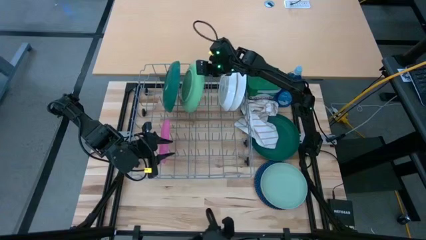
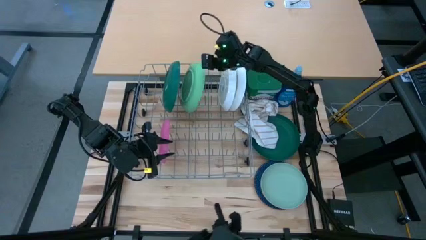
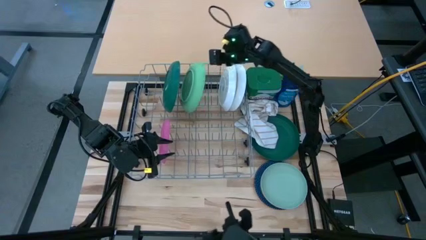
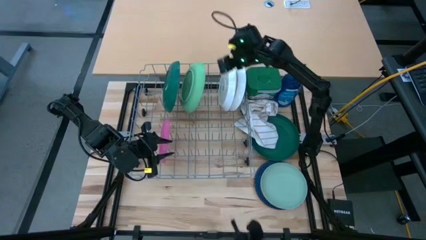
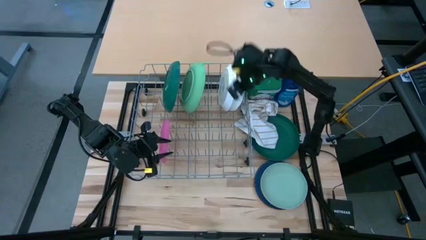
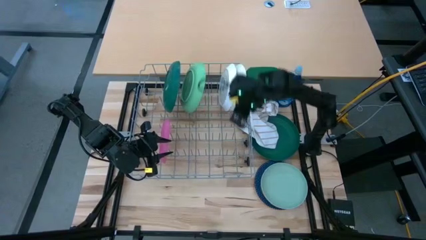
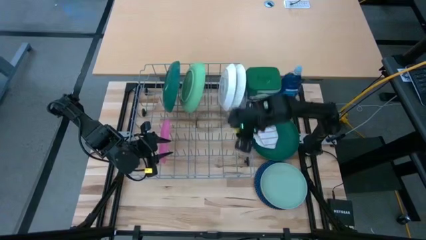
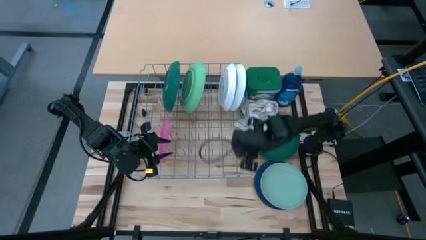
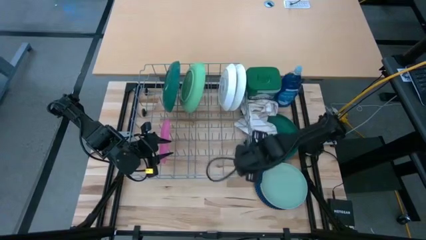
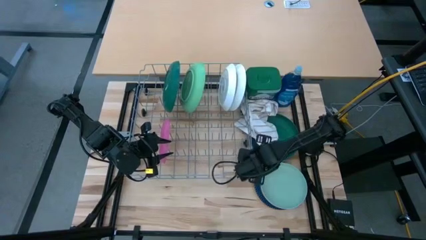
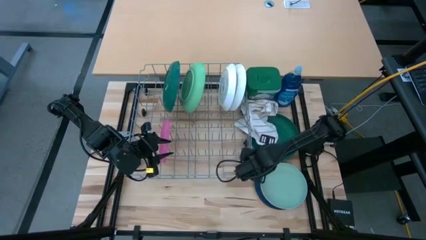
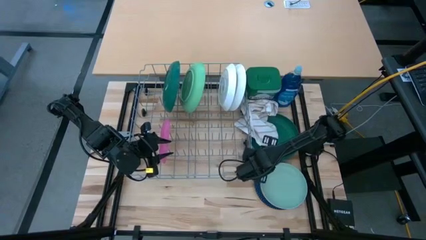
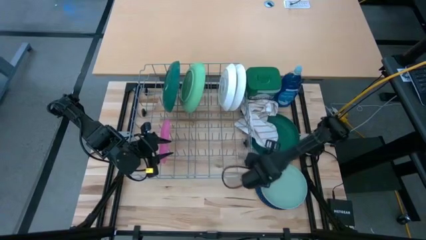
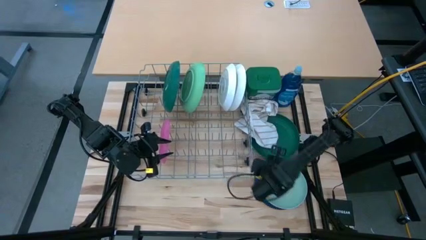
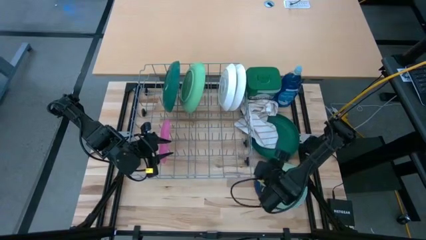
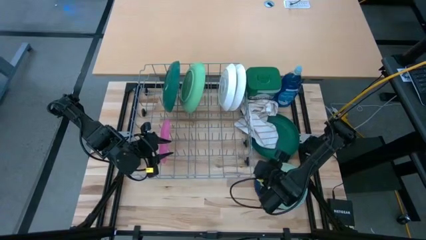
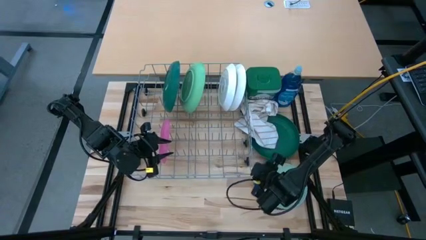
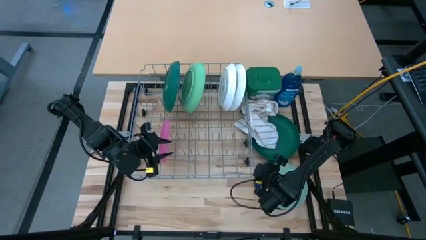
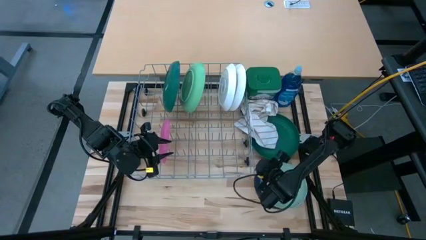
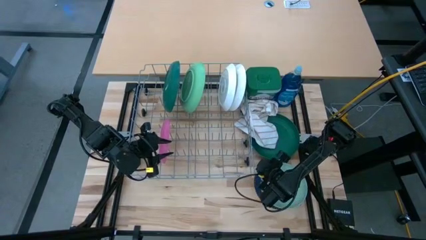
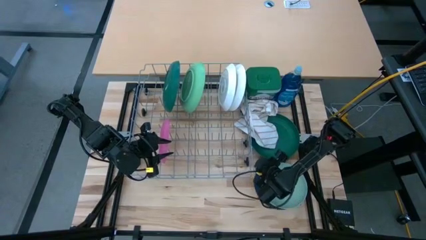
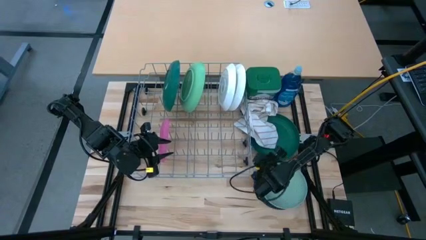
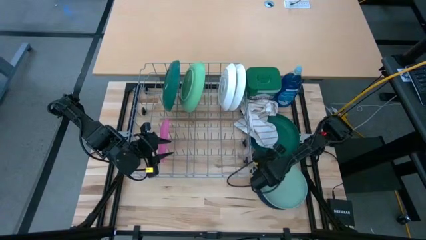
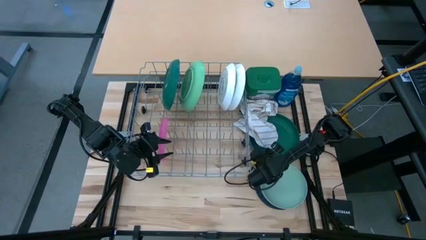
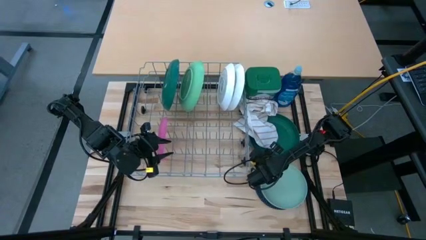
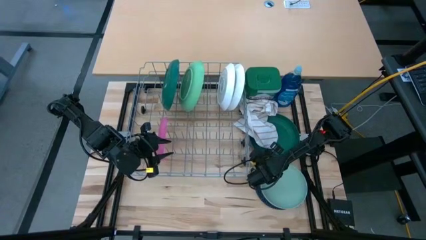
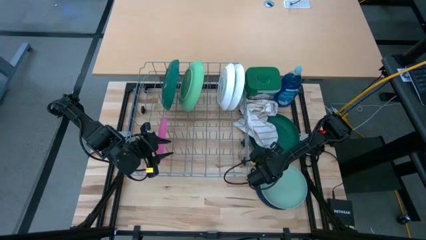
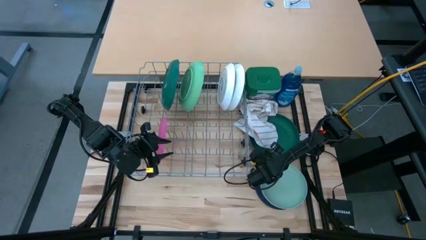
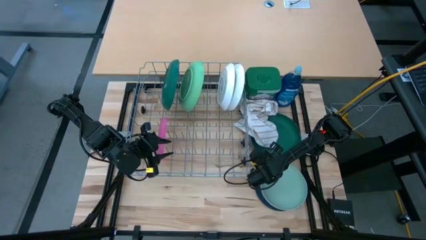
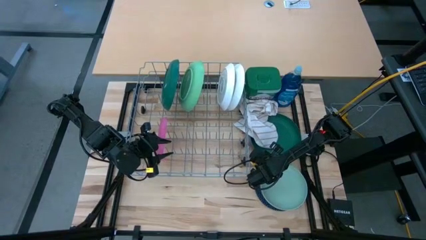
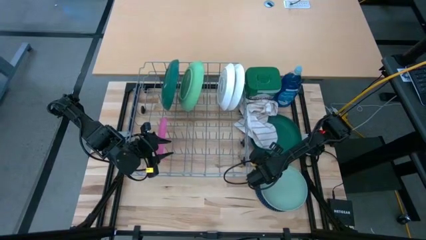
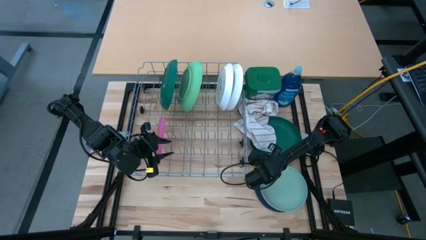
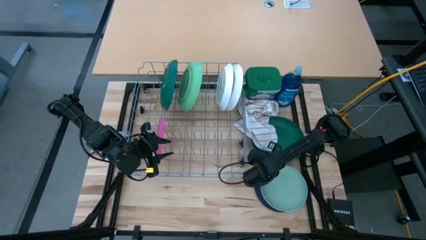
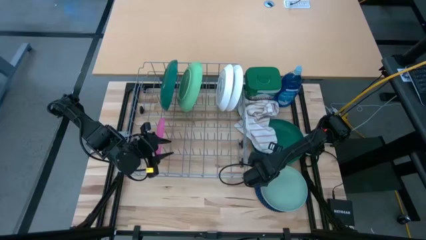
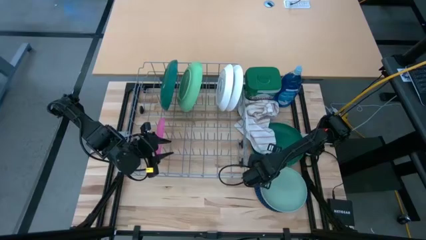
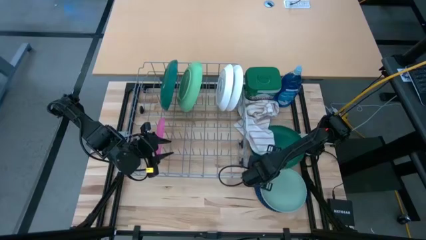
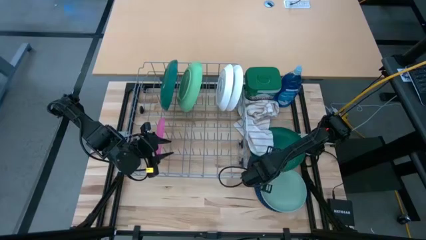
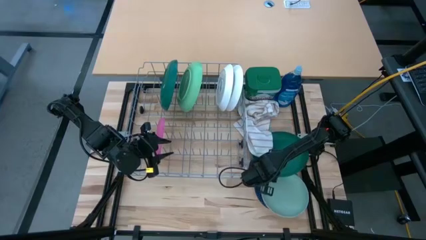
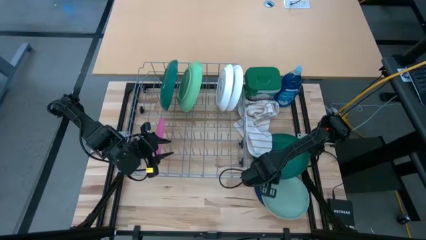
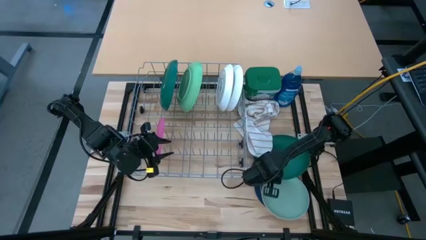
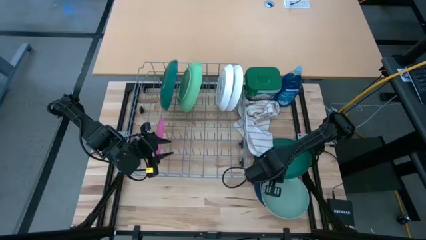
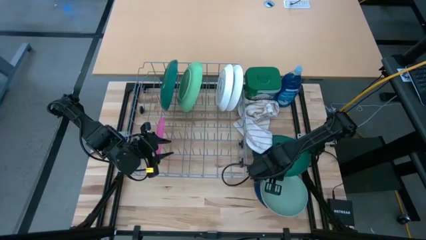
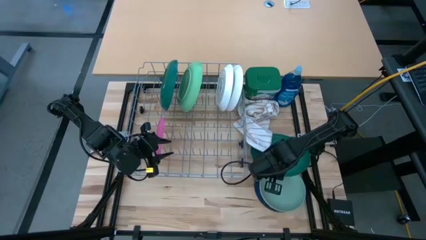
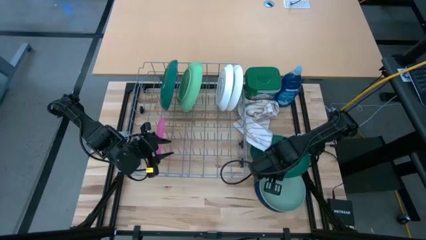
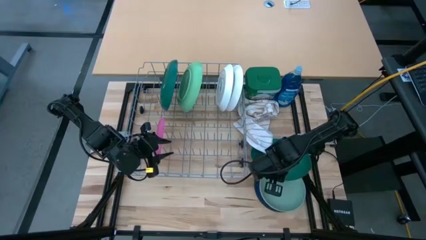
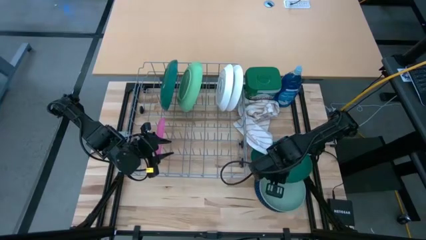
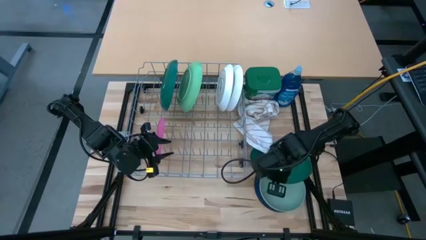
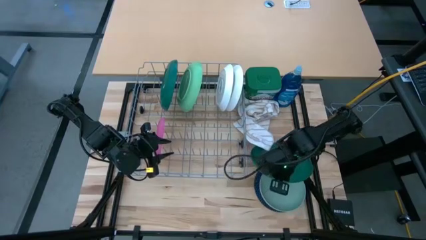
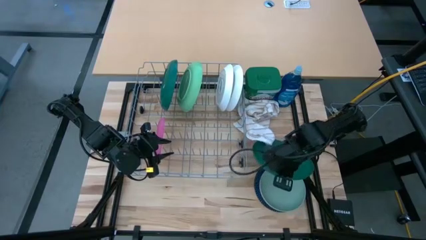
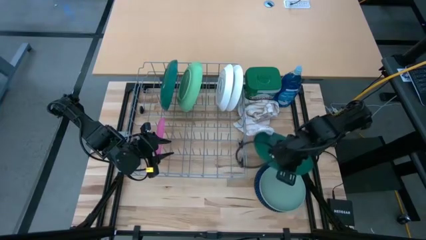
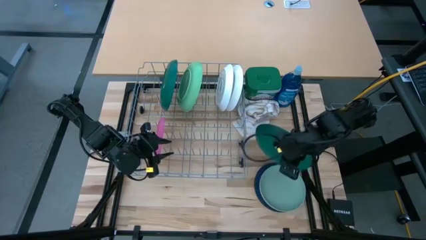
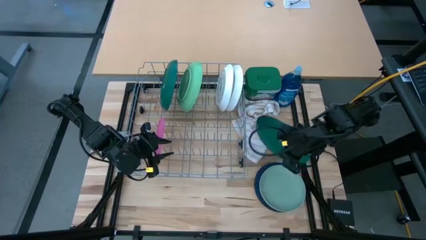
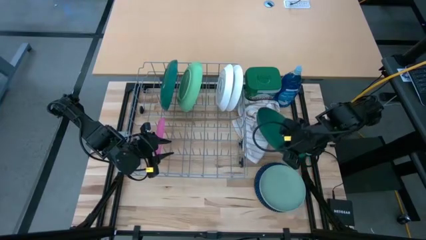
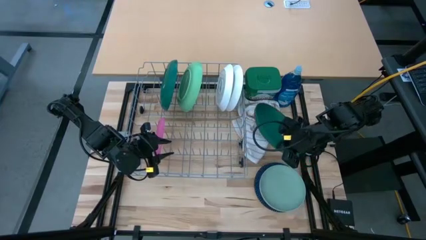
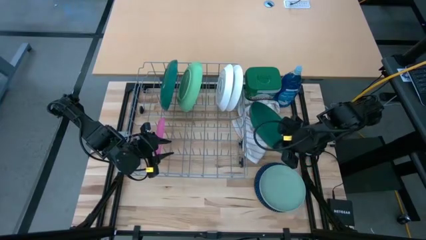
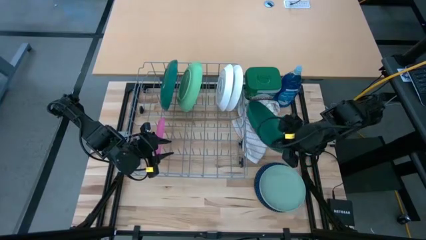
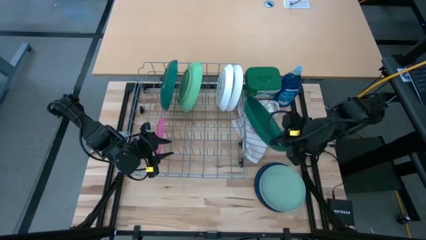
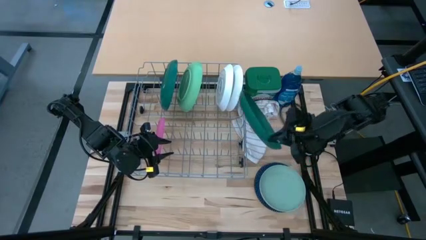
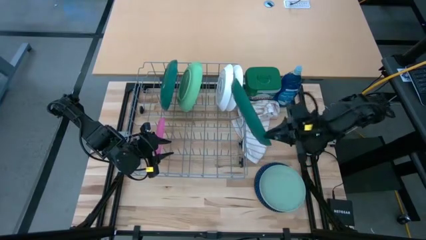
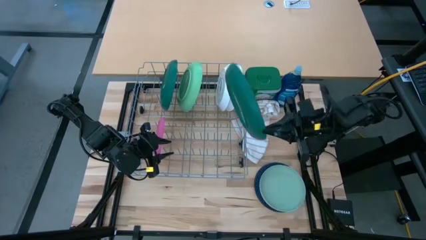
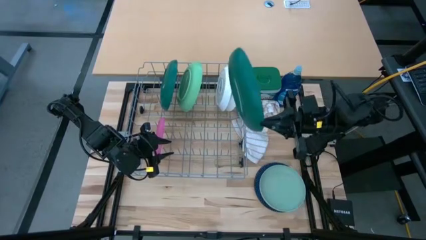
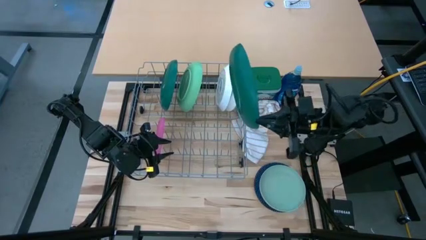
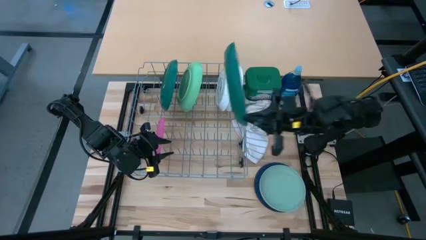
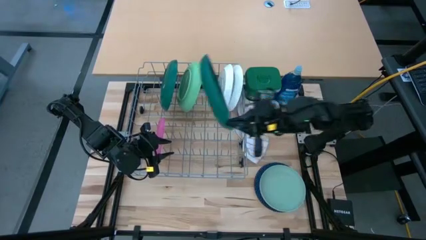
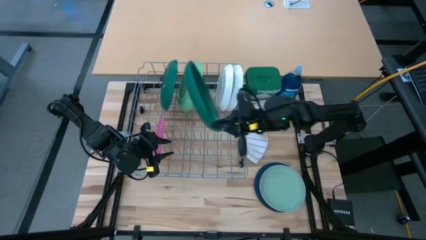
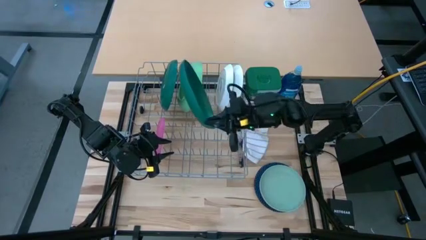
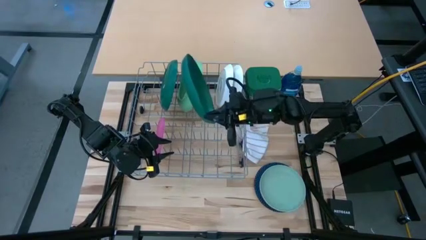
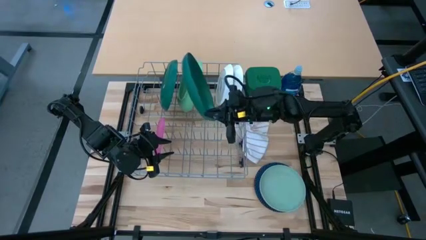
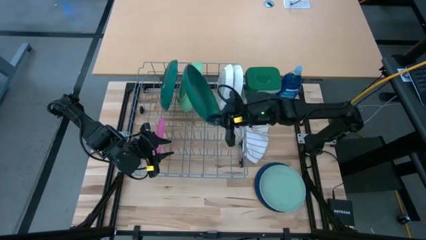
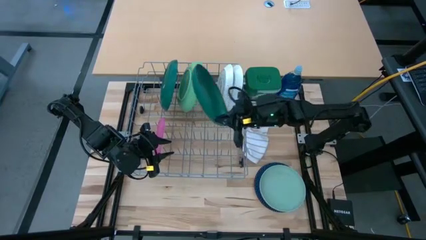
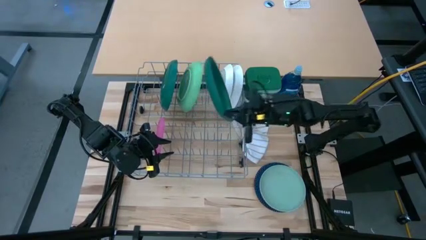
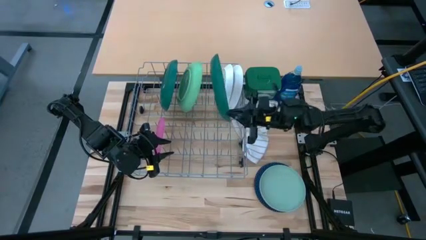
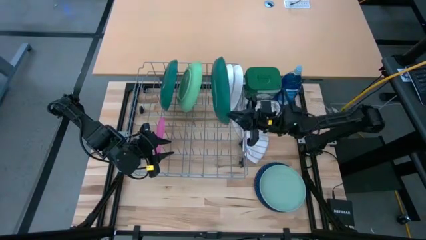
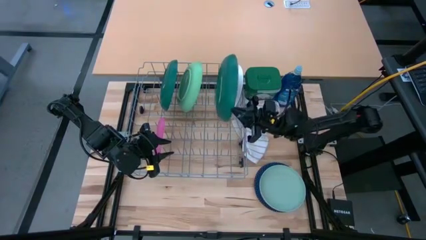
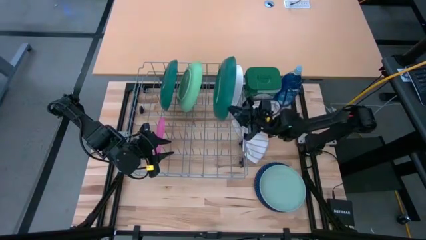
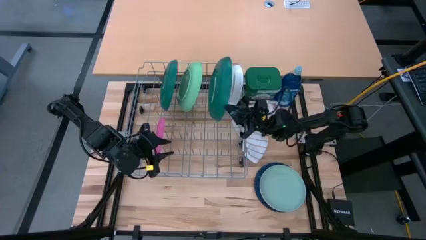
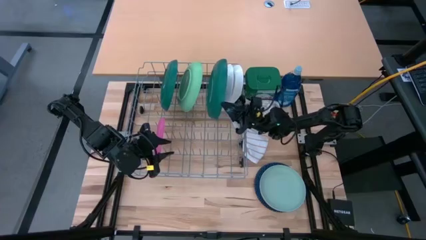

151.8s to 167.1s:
Task: Sort dishes
Put the green plate in the dish rack
